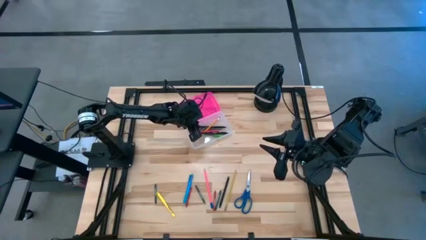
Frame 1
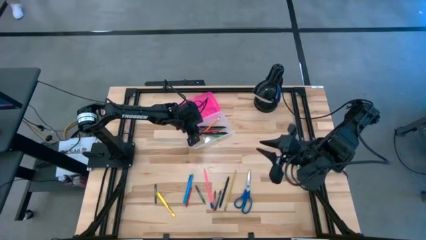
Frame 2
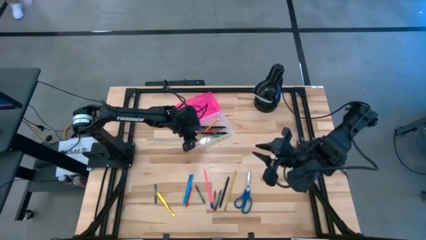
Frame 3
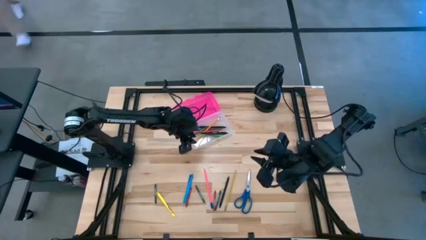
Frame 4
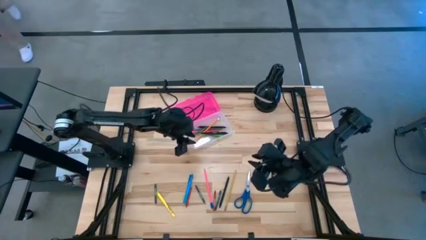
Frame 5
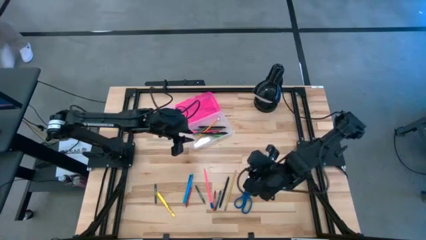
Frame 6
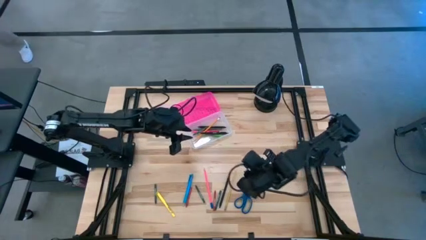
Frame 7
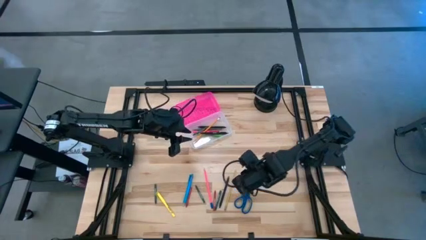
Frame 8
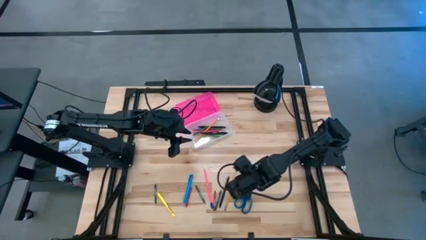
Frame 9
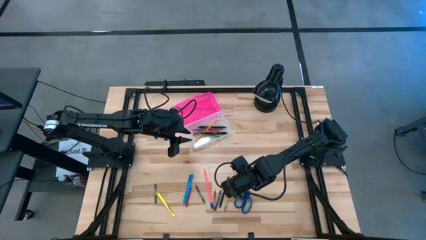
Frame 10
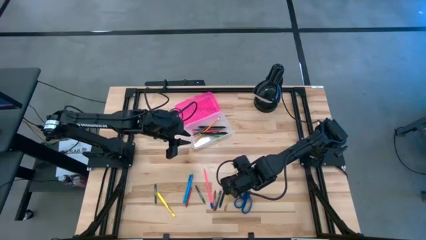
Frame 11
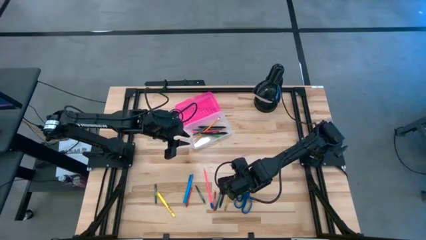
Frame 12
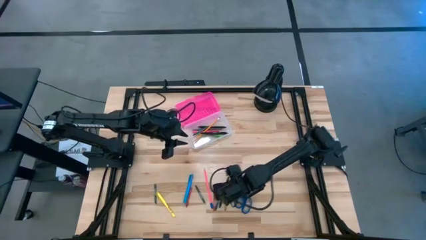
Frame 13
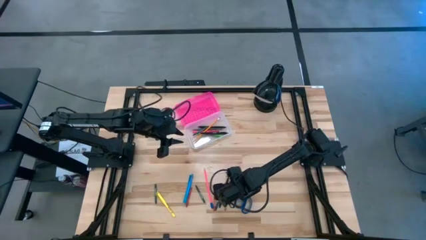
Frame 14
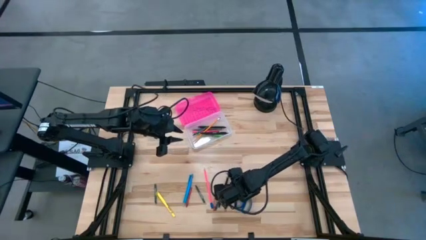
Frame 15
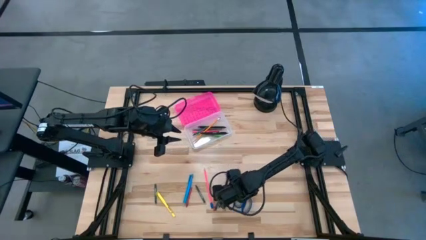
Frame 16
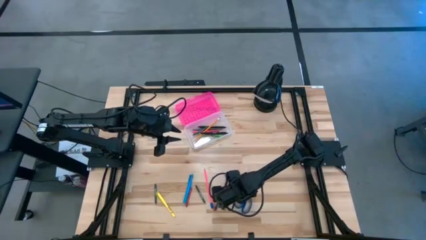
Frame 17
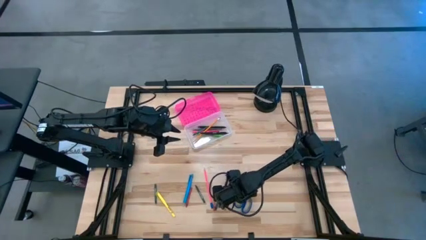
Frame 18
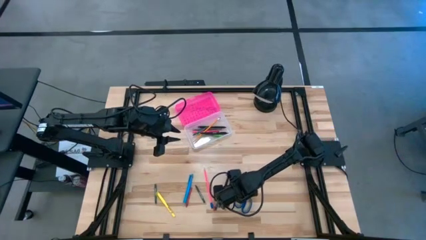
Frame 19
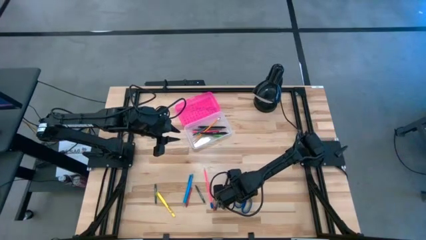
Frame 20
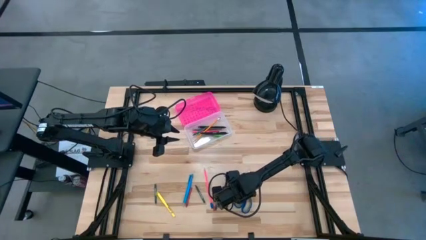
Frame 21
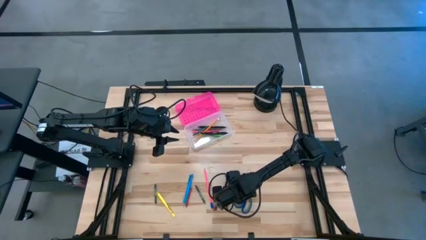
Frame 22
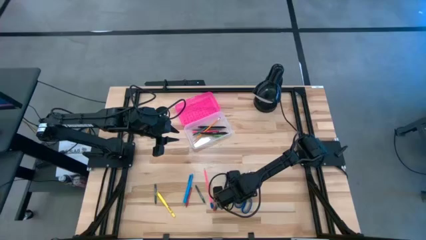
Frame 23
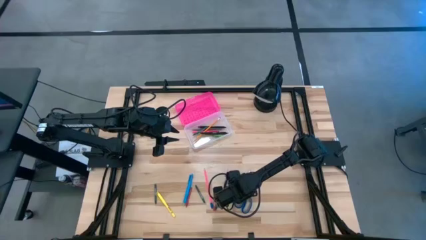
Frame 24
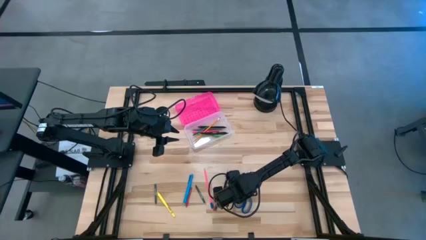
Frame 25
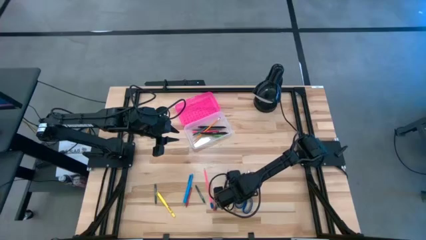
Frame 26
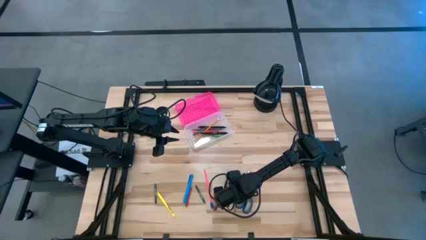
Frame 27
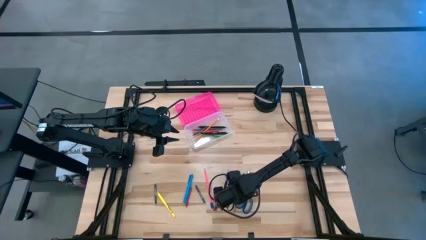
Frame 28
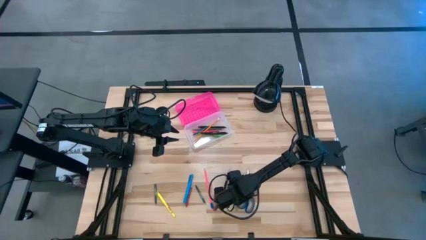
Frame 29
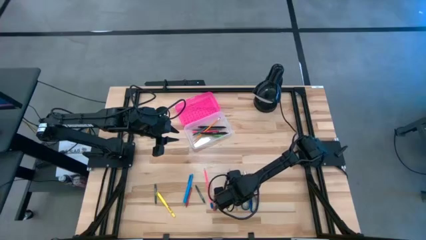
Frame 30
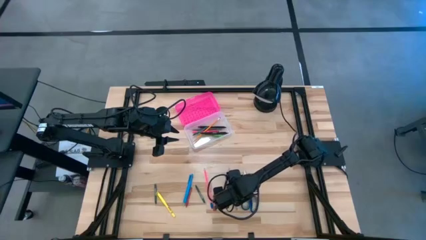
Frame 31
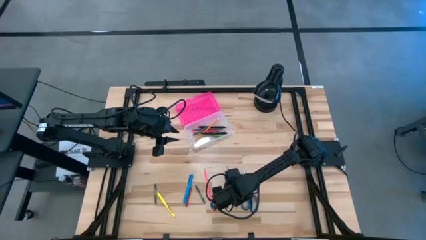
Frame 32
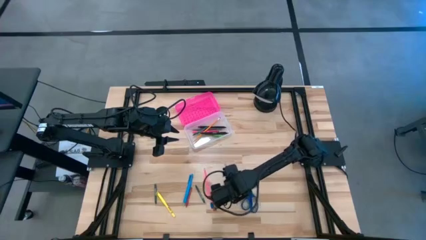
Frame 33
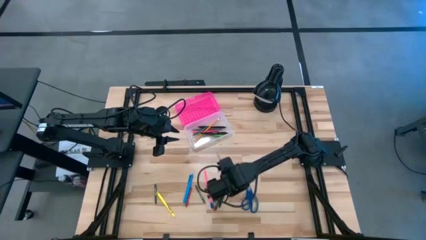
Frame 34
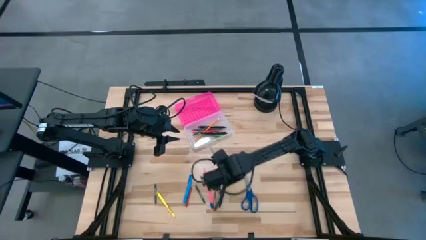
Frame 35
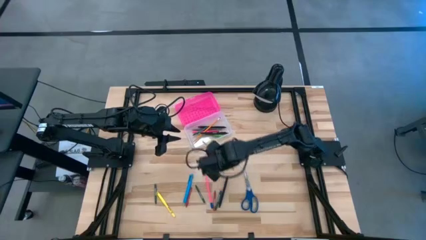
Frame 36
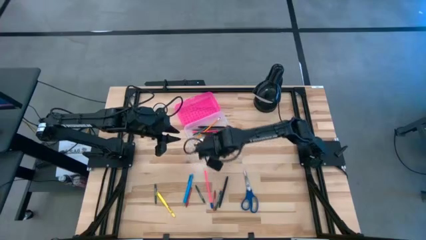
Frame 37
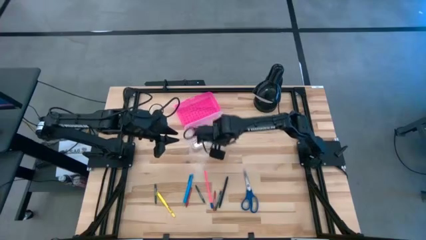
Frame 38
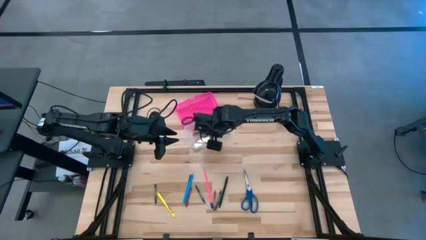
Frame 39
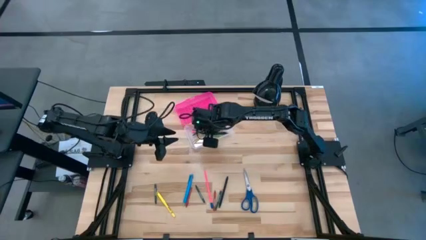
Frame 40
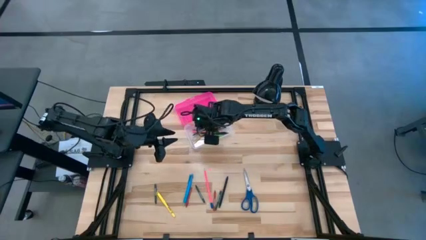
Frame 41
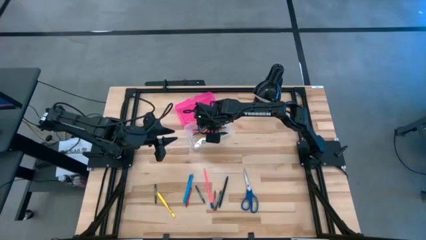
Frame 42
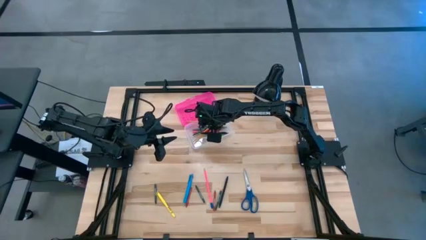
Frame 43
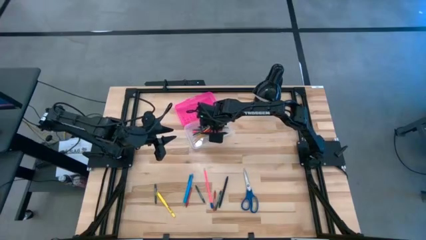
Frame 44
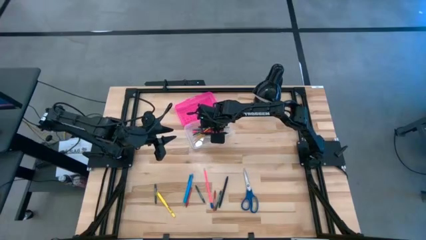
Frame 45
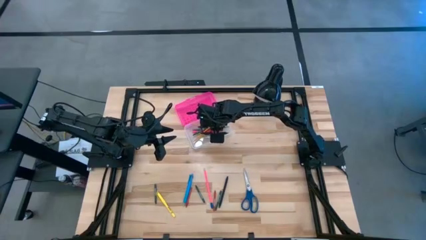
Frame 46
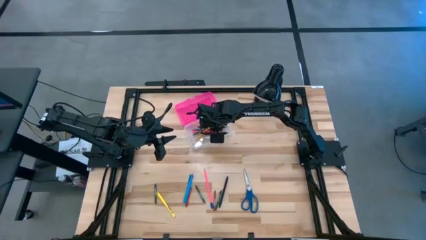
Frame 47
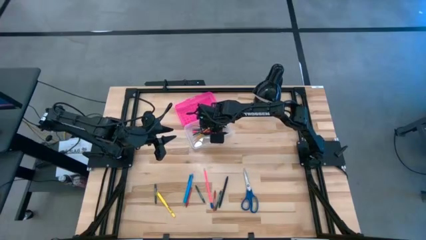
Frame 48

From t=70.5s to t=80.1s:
Task: Pick & place school supplies into a supply box
Put the yellow pencil into the pink supply box

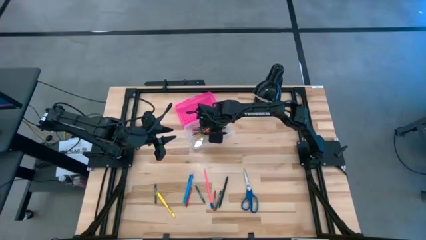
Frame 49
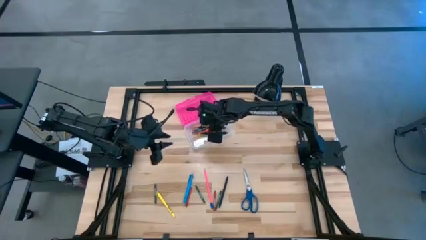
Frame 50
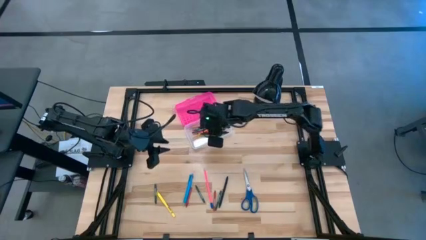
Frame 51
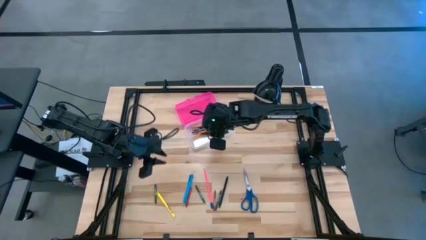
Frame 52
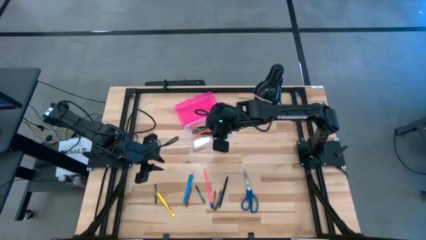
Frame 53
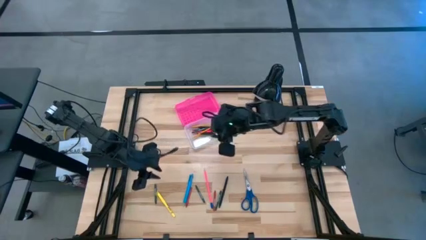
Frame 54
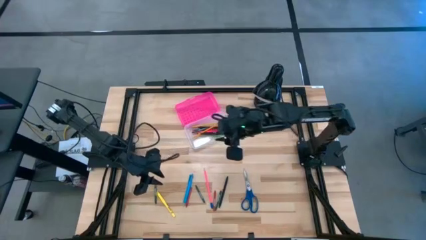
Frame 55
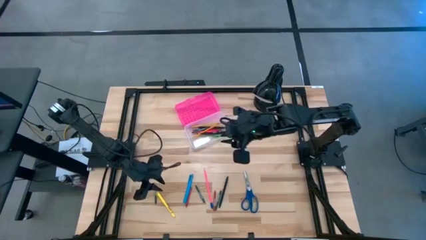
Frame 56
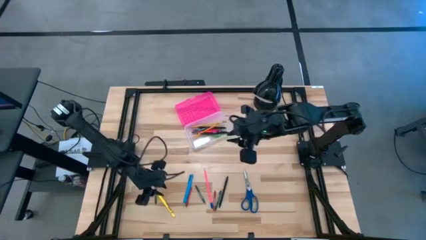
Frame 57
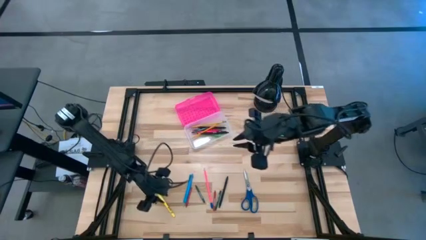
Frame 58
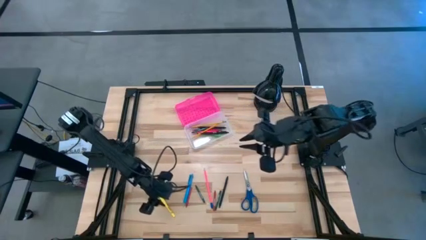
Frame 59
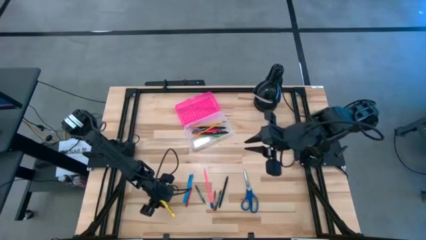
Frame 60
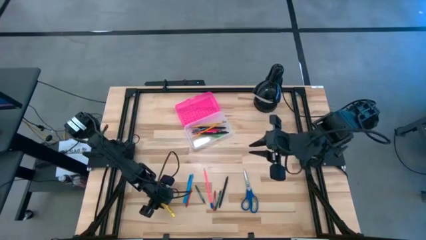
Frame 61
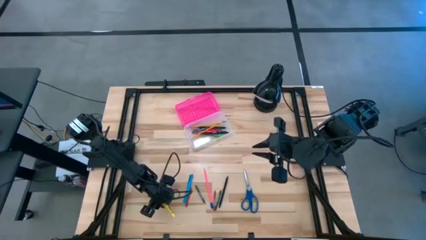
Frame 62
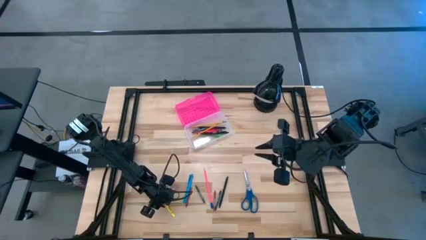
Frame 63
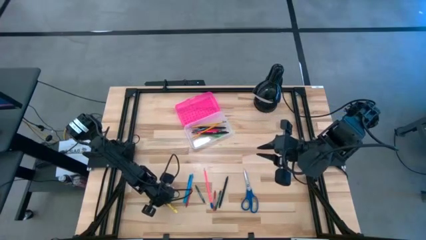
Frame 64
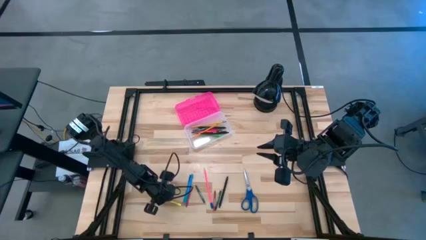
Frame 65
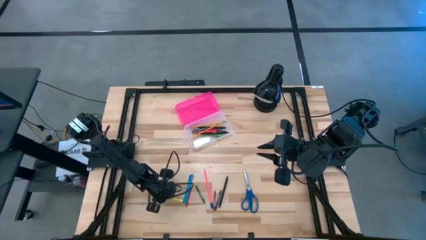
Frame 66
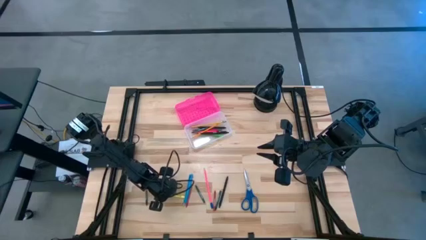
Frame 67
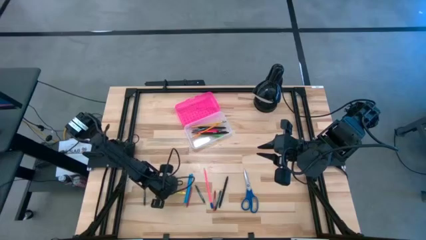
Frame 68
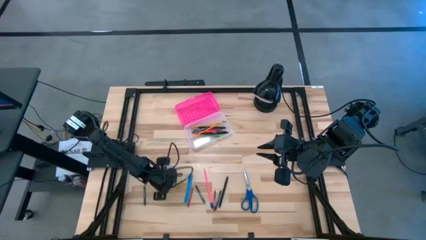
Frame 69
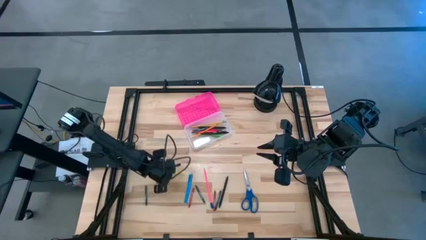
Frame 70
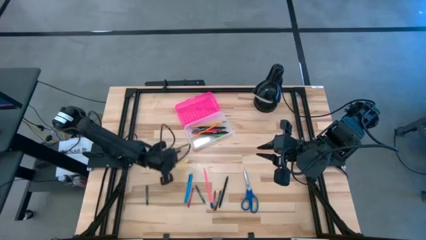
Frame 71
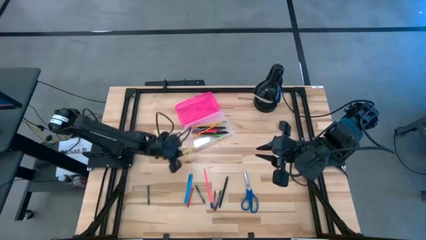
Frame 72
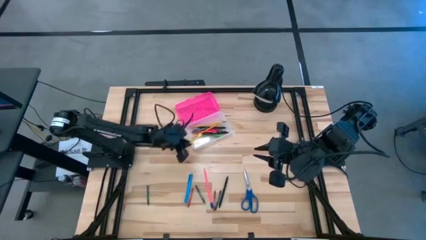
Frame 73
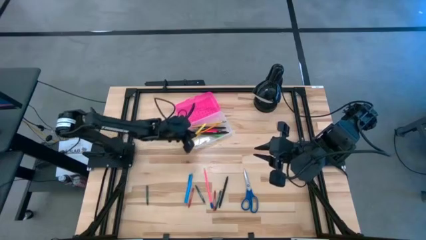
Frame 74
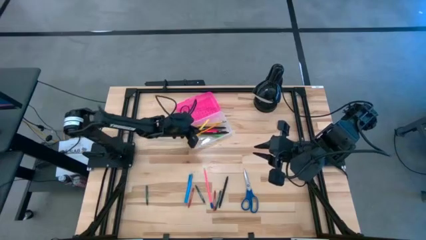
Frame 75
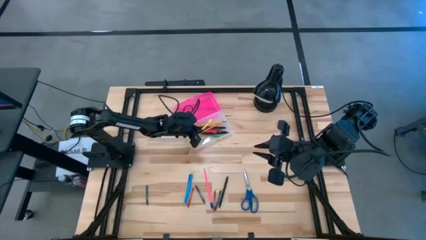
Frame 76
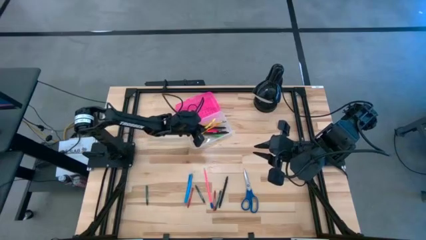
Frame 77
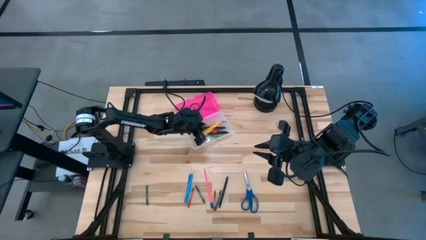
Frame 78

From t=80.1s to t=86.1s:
Put the yellow pen into the pink supply box
